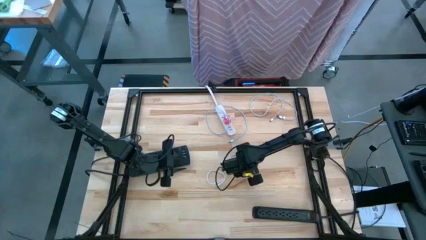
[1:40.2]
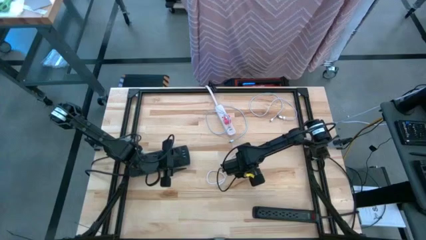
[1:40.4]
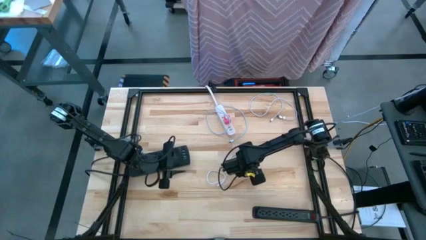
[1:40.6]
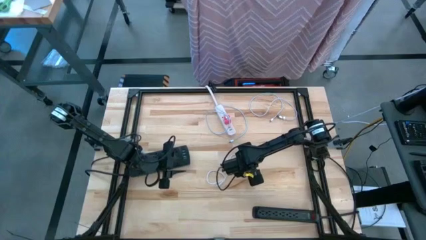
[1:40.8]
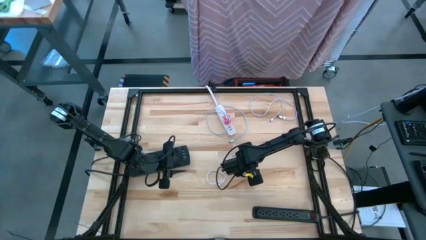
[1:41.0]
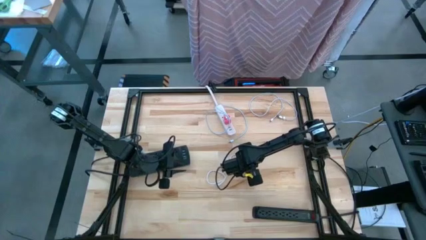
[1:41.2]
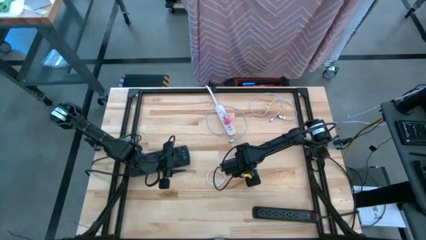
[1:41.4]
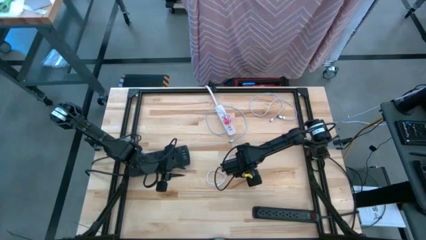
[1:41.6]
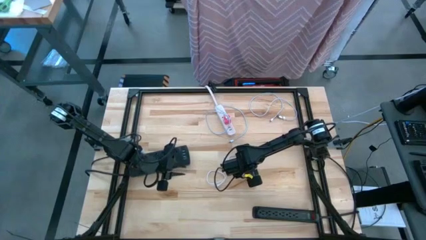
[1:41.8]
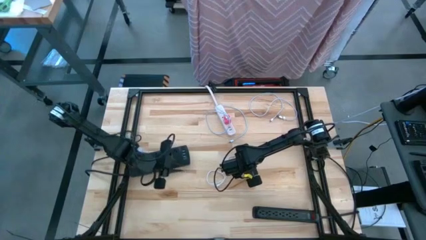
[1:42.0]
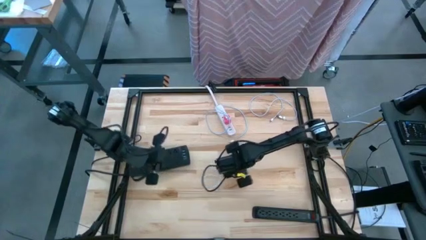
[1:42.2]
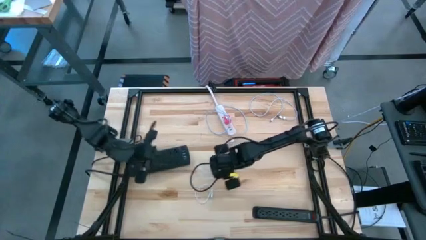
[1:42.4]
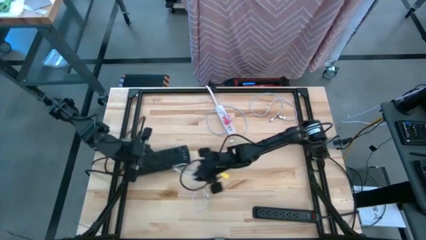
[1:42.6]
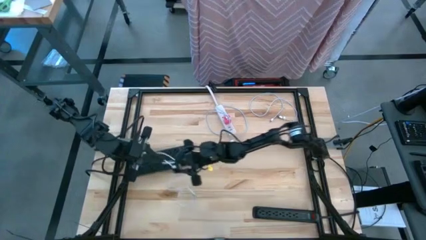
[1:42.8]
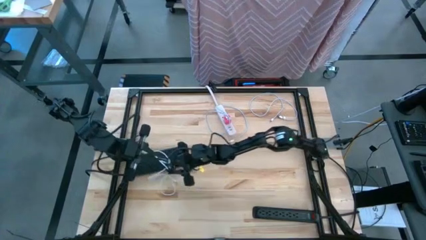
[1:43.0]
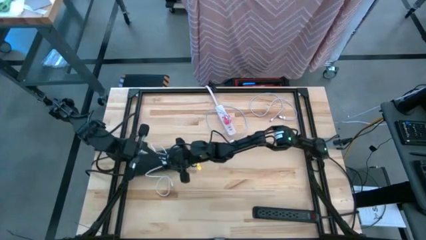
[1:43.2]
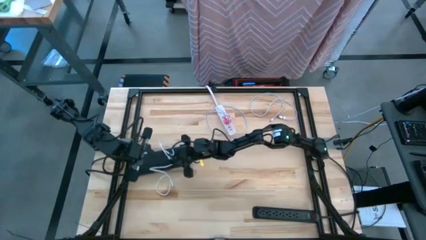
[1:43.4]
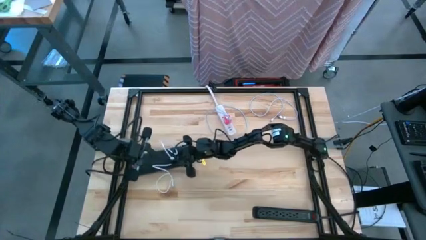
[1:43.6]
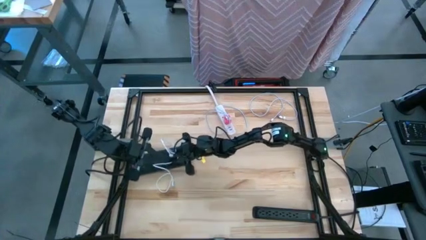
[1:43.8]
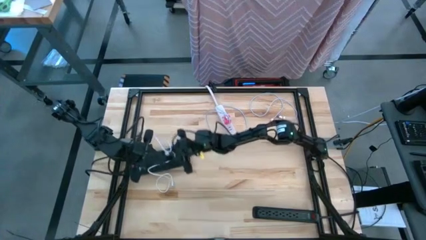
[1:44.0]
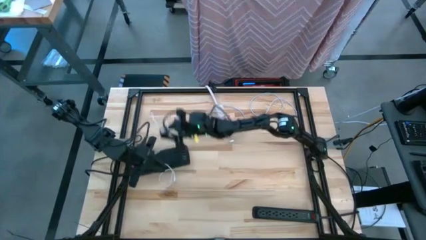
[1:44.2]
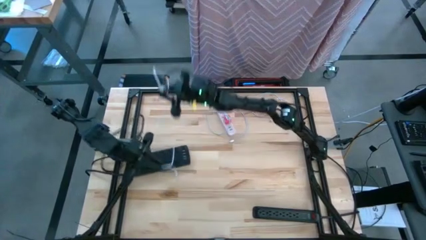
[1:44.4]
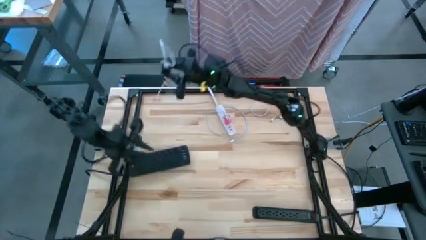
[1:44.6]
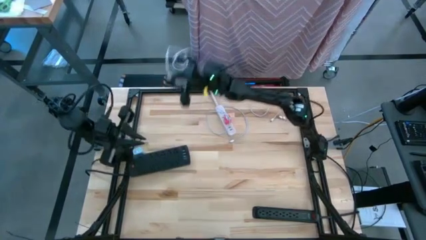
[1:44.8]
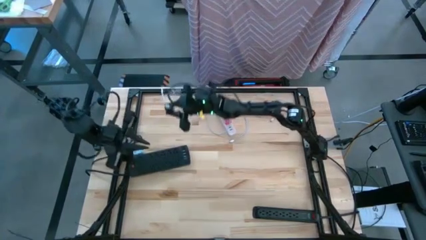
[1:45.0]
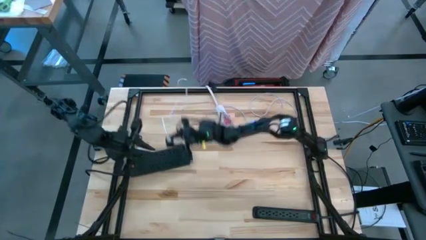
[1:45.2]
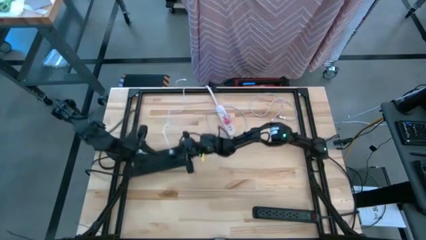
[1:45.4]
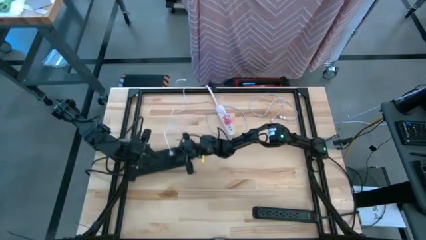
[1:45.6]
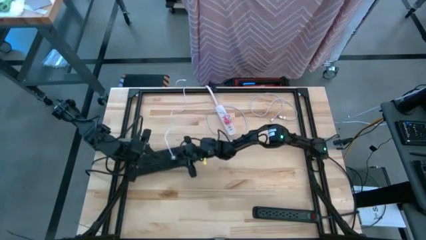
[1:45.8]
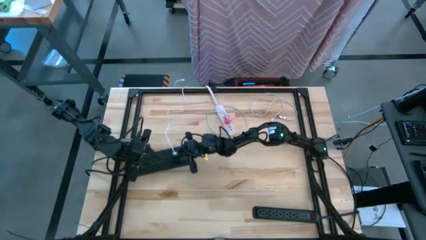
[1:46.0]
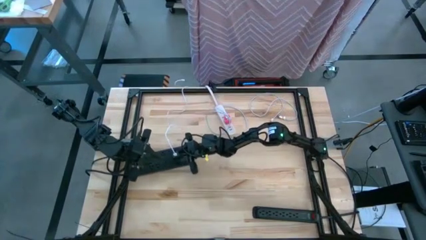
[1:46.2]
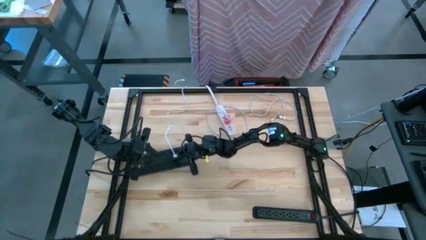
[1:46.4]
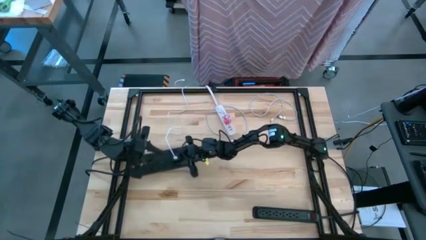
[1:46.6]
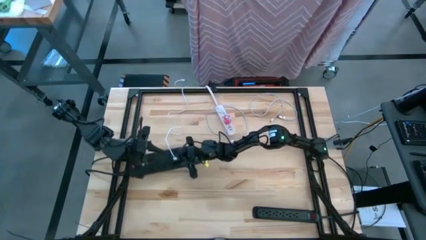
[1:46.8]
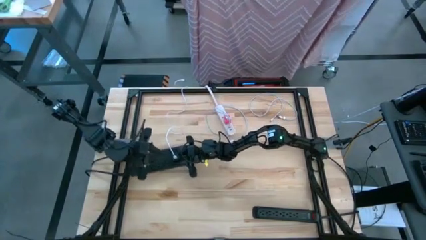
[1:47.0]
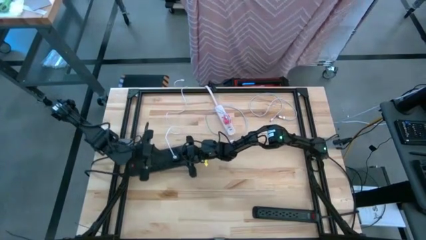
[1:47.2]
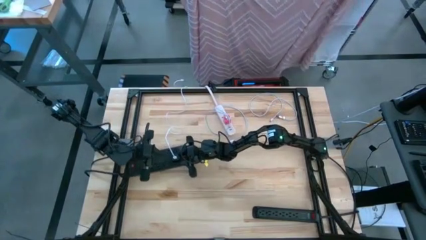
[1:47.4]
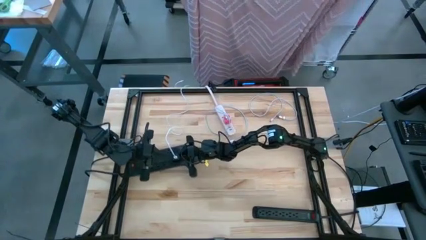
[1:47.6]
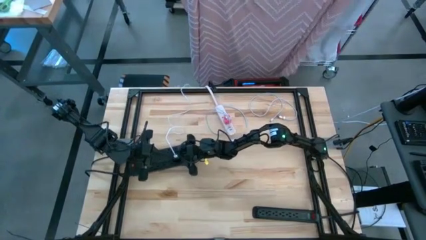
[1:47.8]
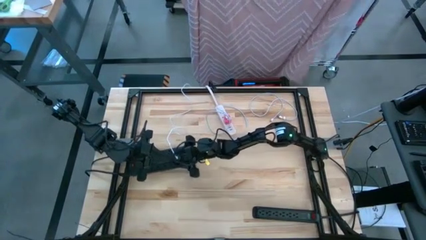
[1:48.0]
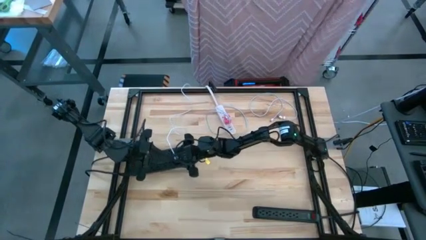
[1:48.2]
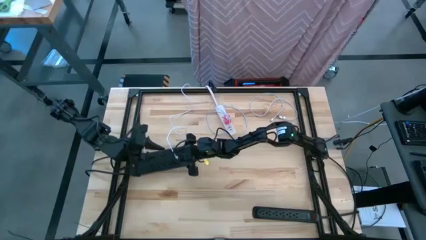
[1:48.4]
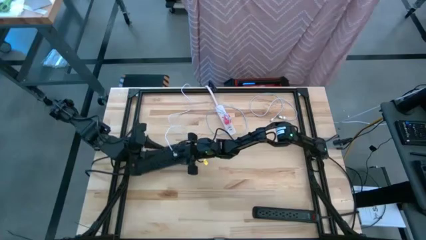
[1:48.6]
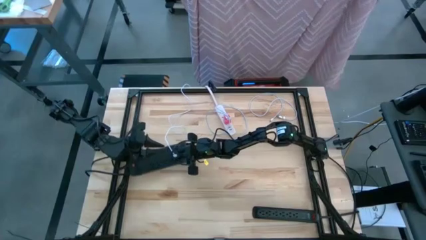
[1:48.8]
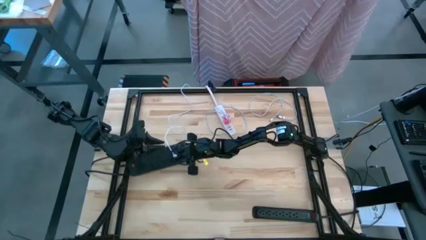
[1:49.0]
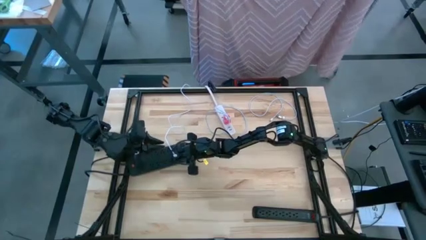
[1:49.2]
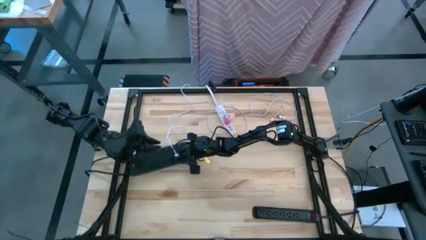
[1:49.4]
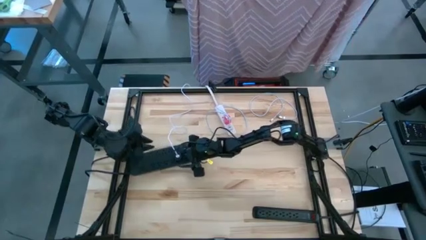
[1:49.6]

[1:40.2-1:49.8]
Task: Insert USB
Insert the black charger adapter into the left black outlet extension

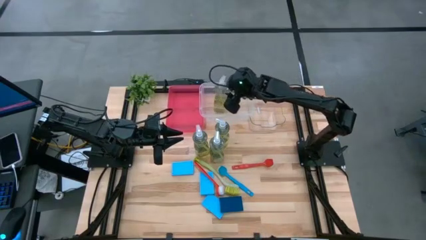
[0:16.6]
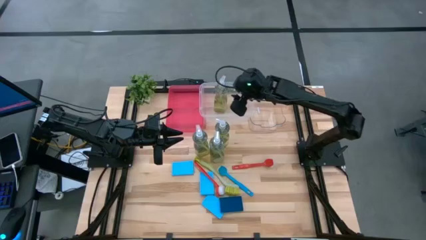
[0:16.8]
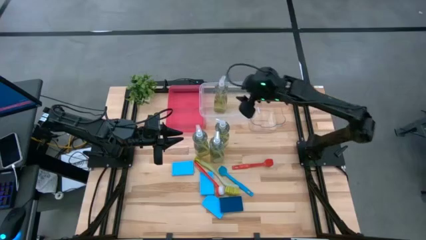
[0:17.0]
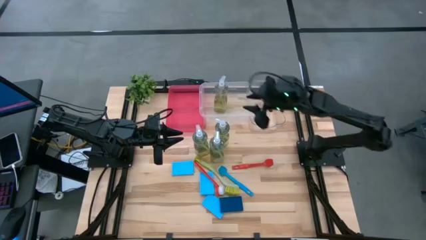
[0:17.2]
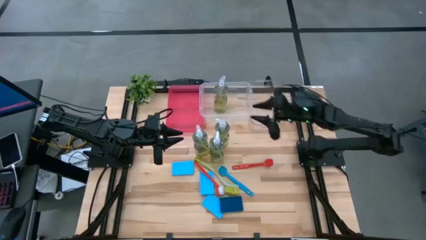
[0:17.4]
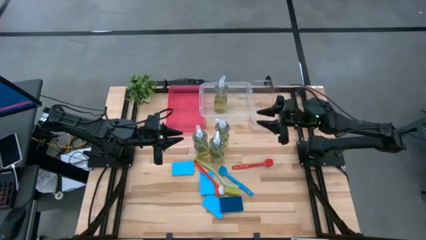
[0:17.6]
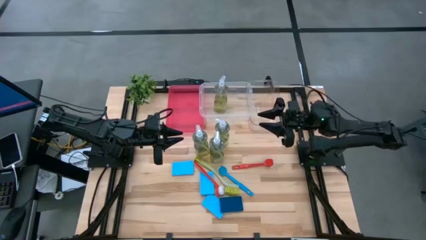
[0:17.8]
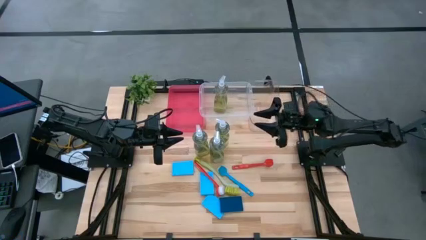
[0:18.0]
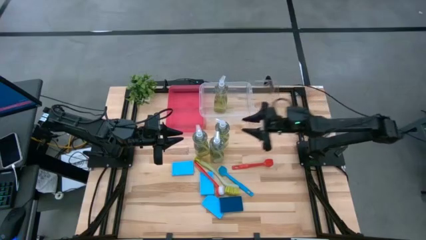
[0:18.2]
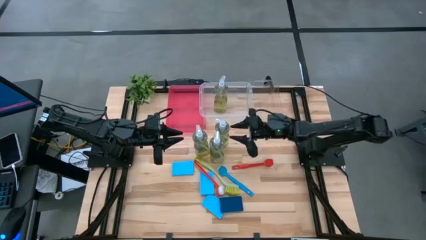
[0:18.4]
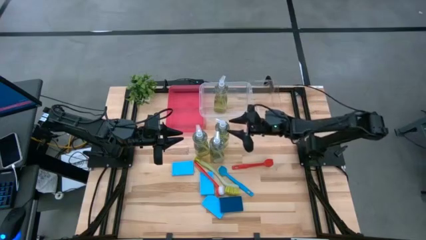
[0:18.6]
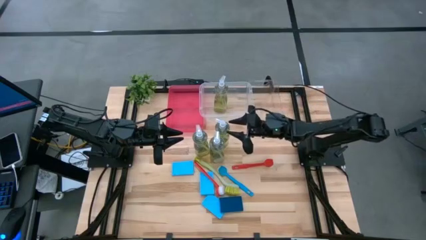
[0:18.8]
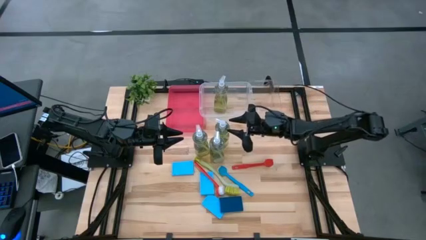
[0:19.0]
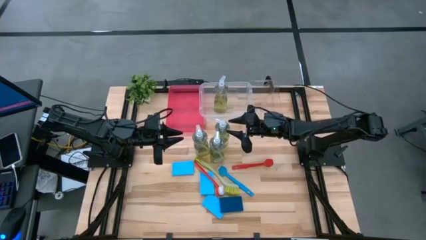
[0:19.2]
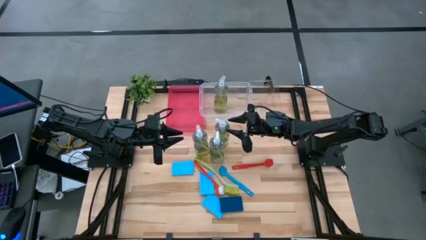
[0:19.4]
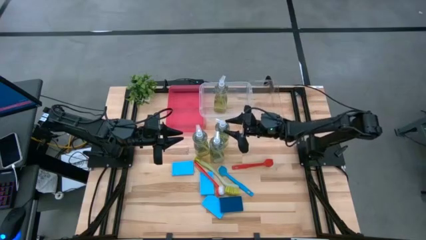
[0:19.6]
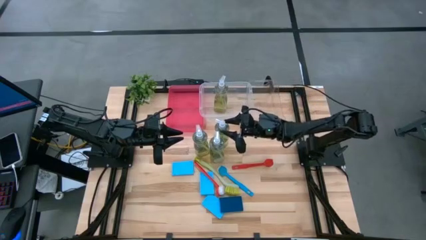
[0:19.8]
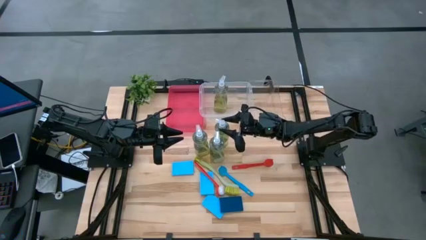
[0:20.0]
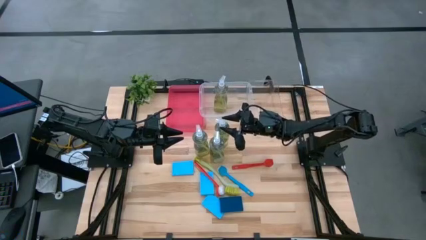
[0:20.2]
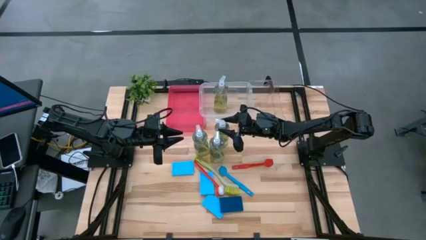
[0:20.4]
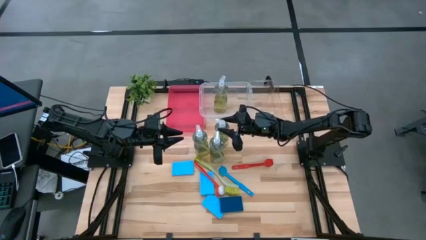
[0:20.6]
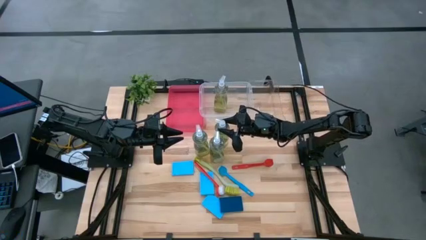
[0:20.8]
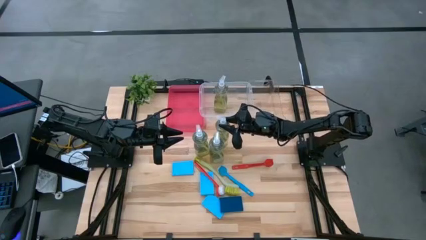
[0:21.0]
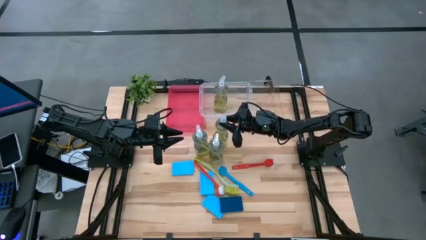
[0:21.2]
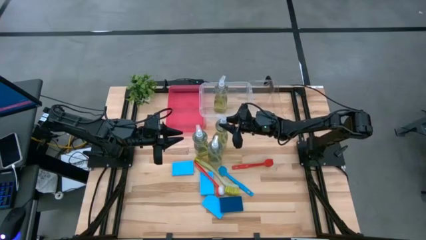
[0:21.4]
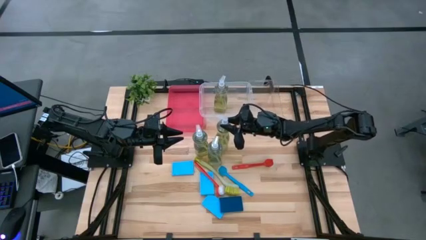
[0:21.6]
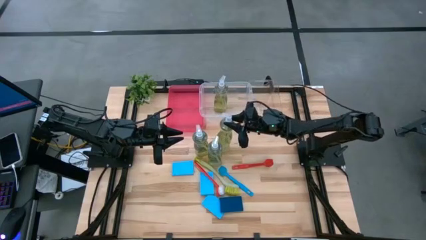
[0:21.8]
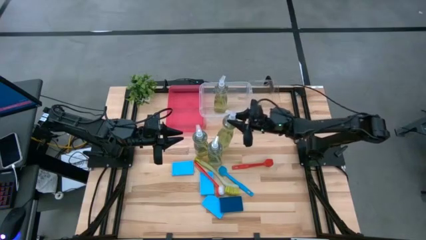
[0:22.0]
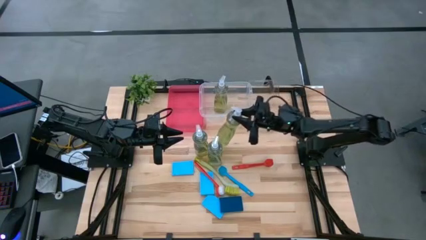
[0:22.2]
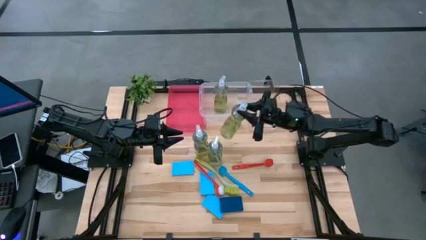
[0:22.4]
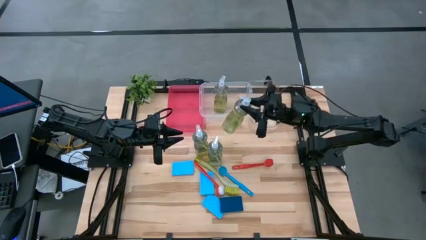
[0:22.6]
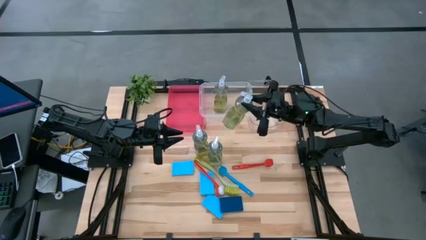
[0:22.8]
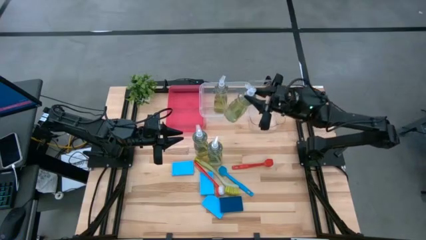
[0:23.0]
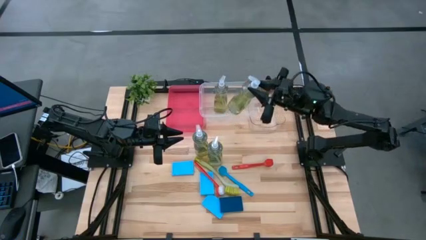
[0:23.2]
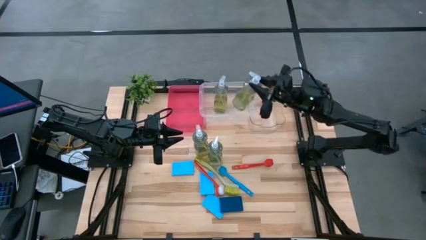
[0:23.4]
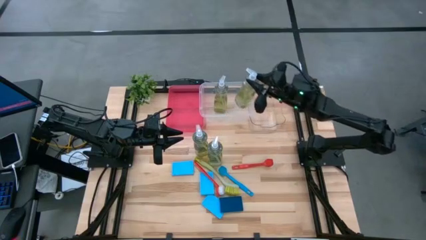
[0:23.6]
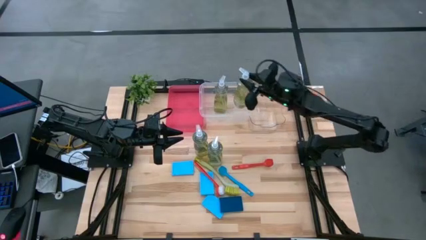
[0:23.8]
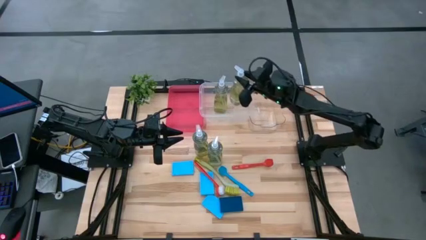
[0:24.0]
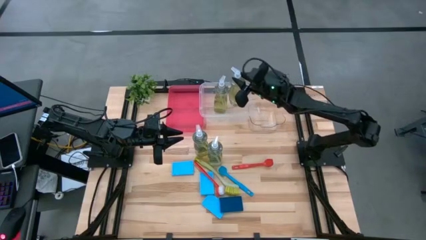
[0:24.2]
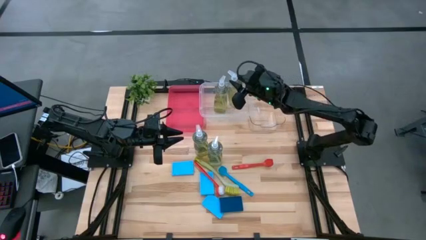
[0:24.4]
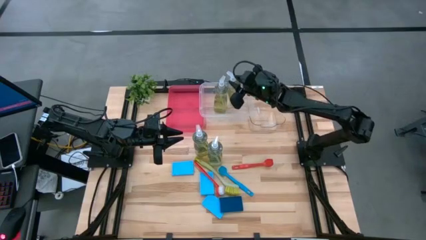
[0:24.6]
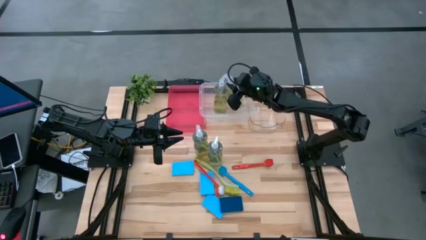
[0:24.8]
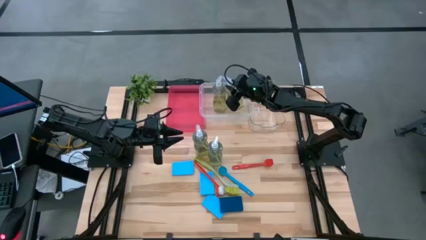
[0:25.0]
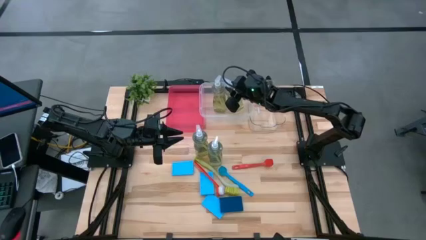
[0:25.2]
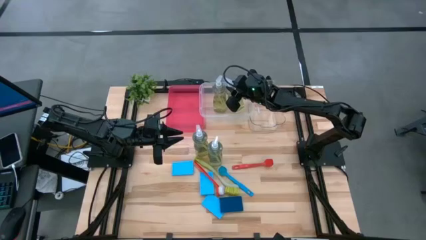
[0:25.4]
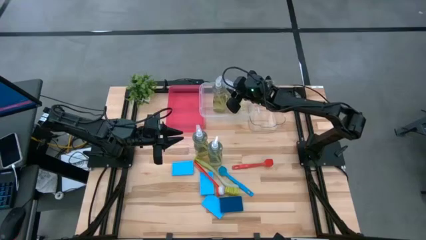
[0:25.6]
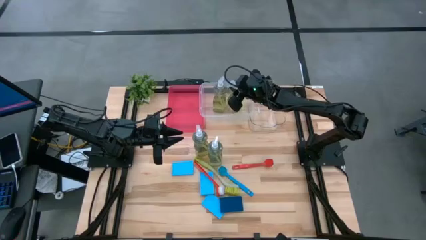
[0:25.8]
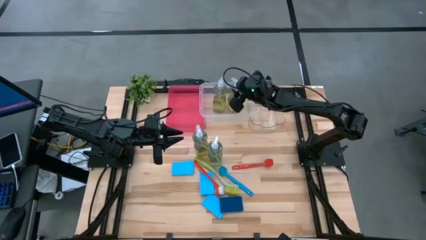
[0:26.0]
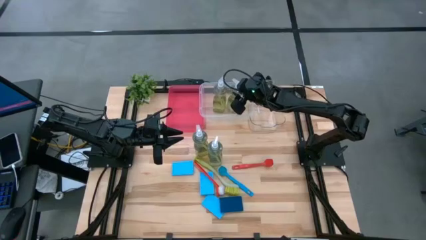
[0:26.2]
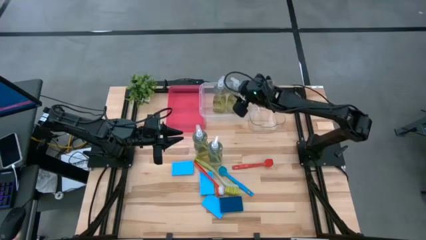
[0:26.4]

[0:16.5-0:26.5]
Task: Pick & Place Kitchen Sink Supplies
Put the green dishwashing liquid into the white bin
